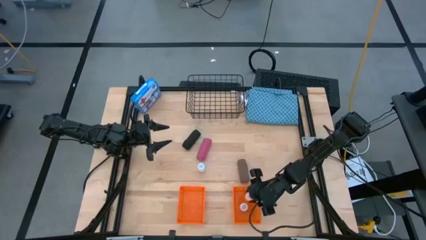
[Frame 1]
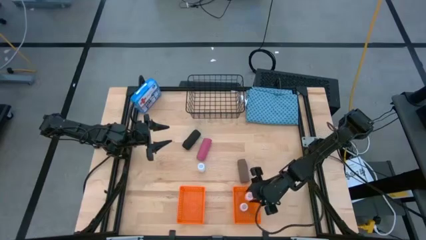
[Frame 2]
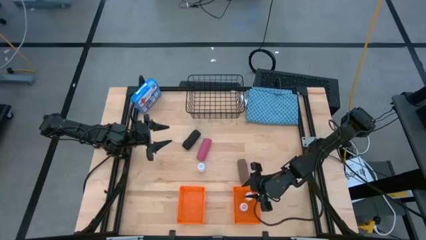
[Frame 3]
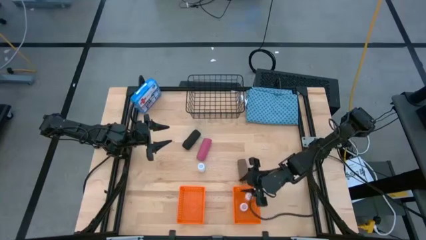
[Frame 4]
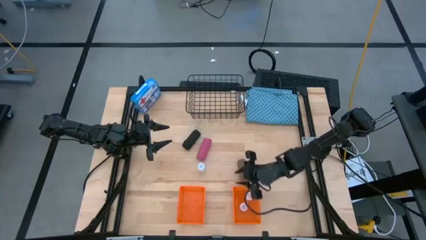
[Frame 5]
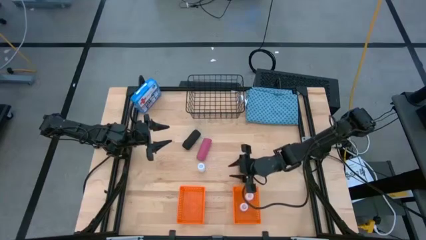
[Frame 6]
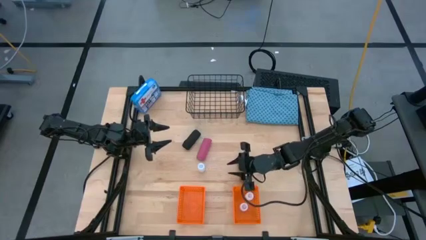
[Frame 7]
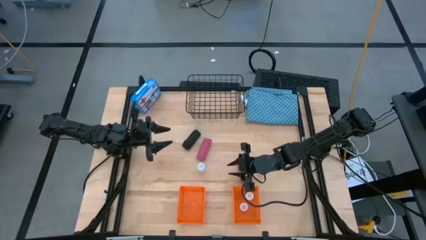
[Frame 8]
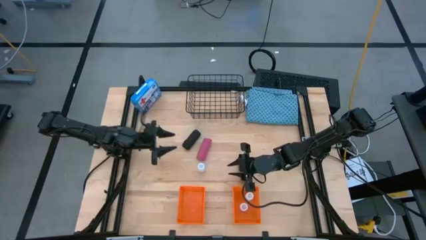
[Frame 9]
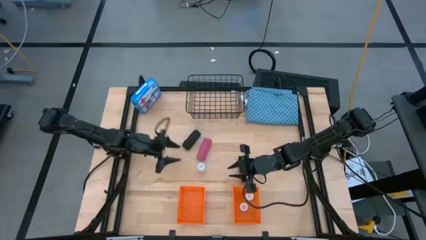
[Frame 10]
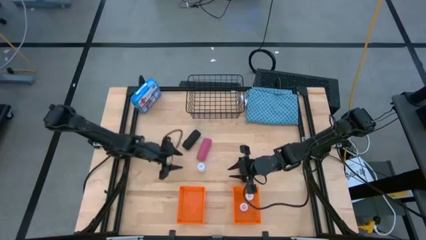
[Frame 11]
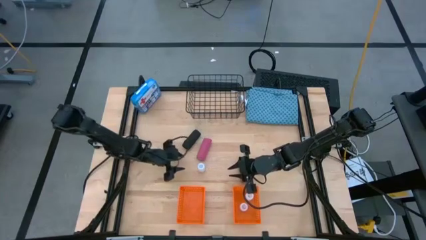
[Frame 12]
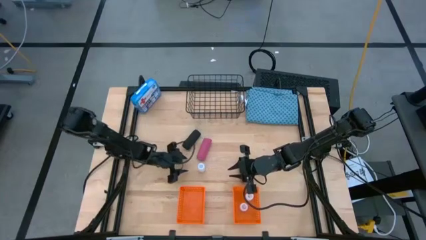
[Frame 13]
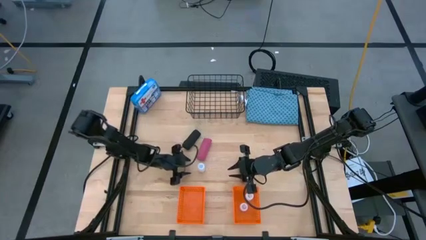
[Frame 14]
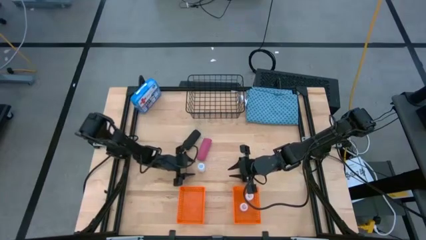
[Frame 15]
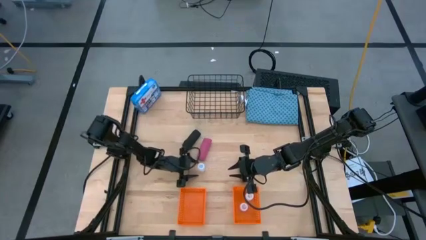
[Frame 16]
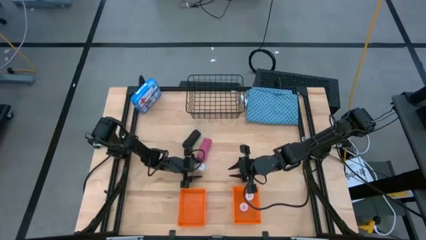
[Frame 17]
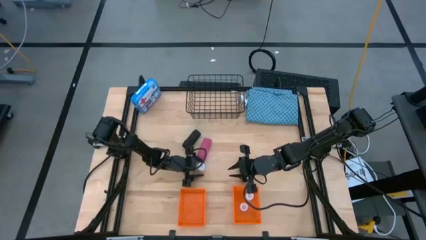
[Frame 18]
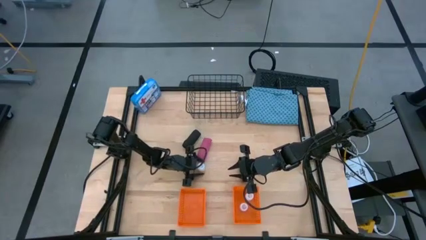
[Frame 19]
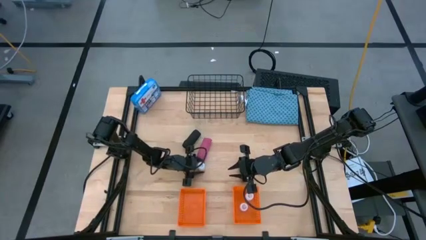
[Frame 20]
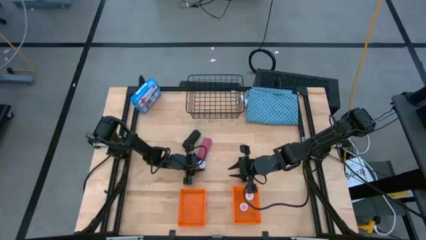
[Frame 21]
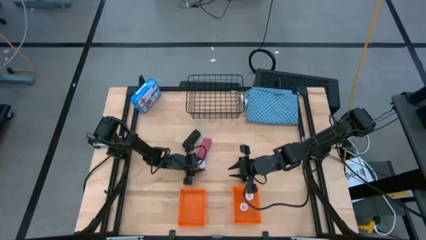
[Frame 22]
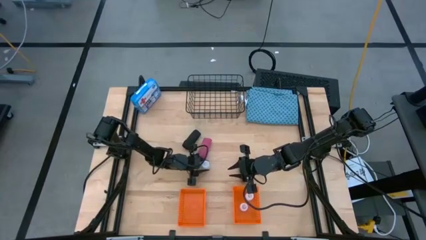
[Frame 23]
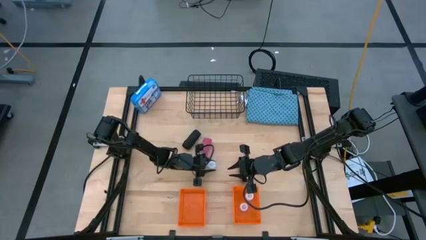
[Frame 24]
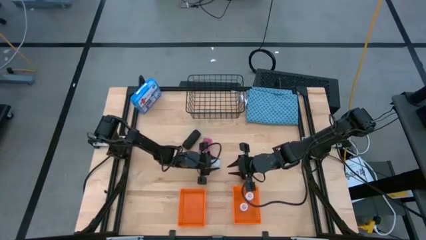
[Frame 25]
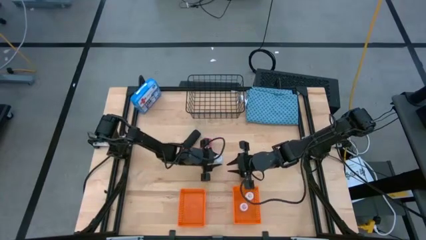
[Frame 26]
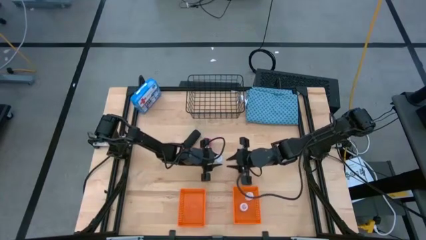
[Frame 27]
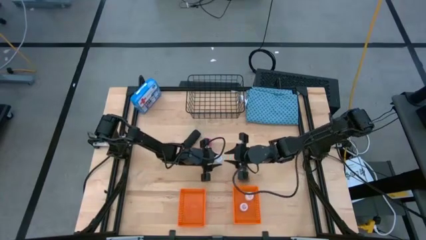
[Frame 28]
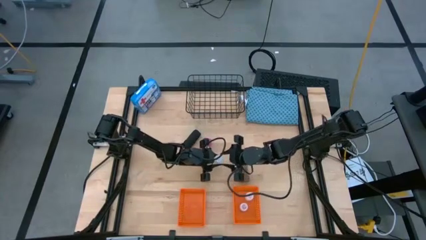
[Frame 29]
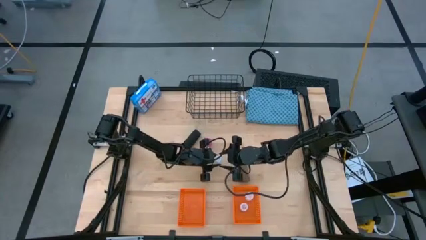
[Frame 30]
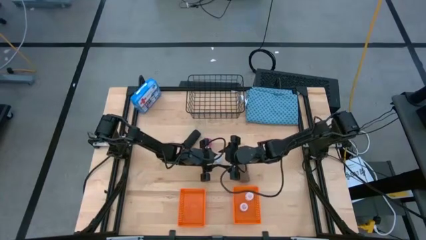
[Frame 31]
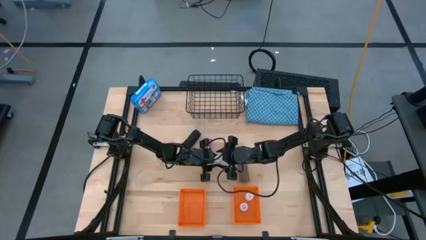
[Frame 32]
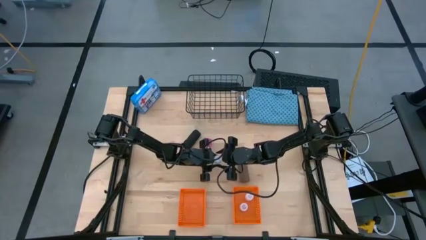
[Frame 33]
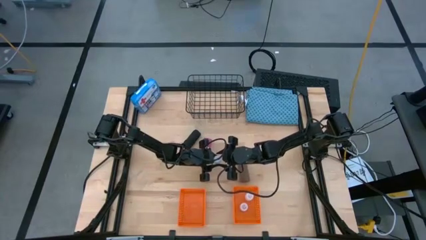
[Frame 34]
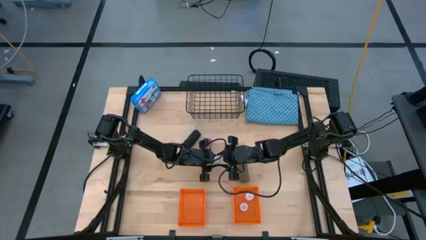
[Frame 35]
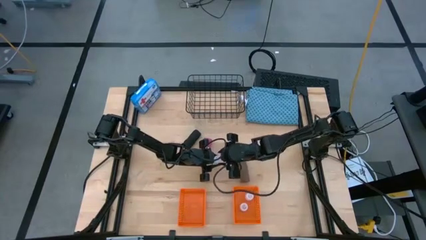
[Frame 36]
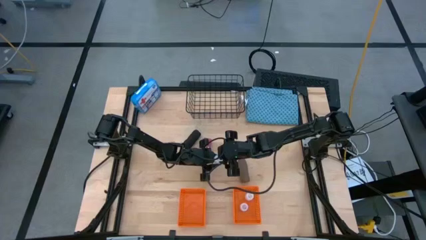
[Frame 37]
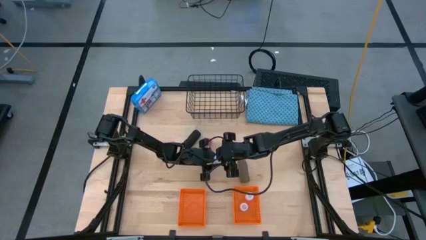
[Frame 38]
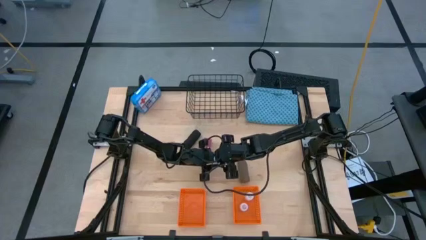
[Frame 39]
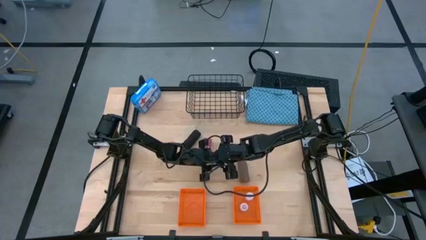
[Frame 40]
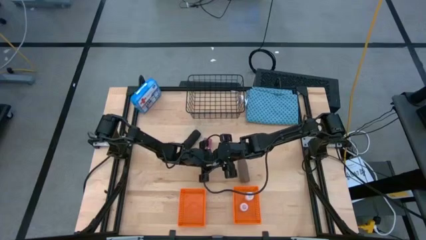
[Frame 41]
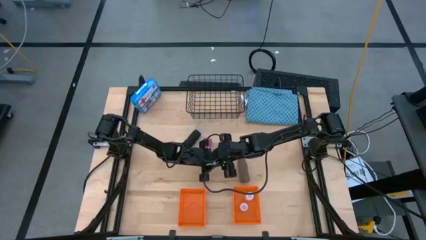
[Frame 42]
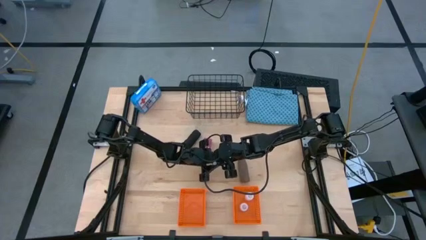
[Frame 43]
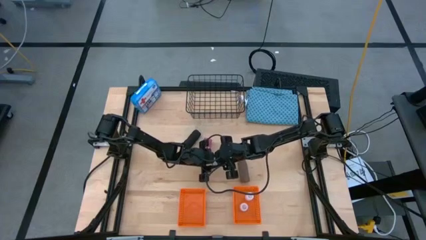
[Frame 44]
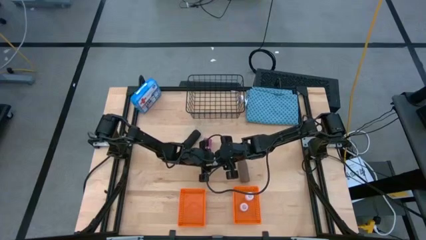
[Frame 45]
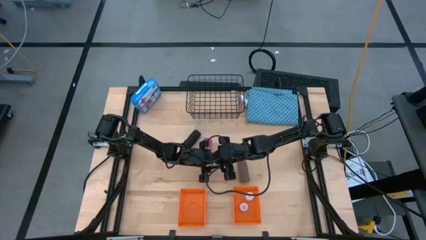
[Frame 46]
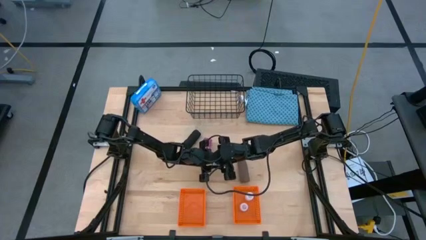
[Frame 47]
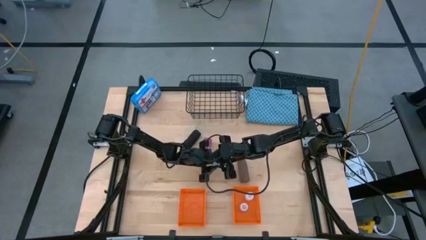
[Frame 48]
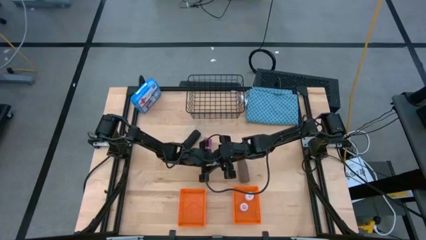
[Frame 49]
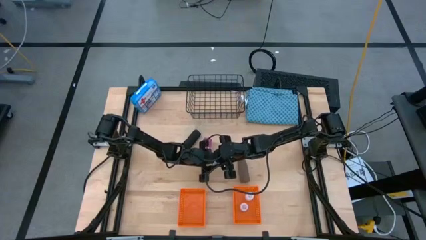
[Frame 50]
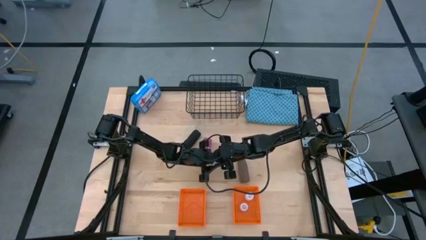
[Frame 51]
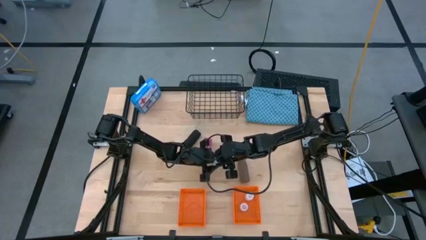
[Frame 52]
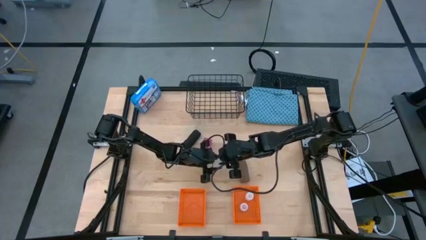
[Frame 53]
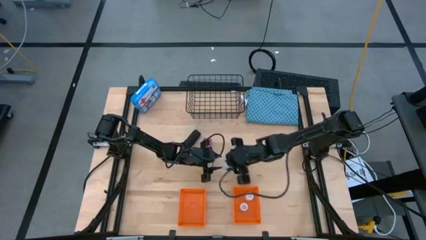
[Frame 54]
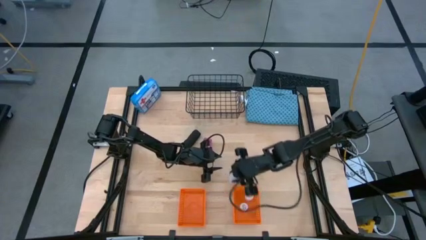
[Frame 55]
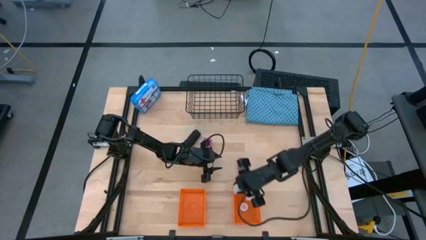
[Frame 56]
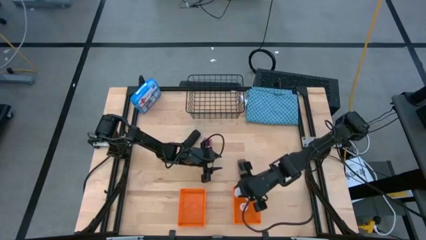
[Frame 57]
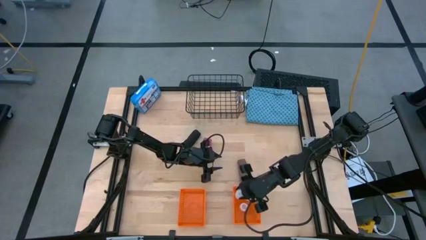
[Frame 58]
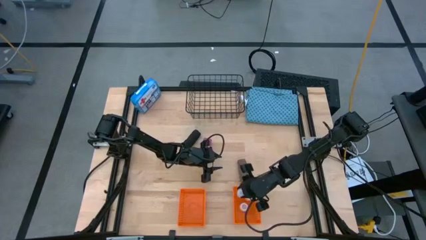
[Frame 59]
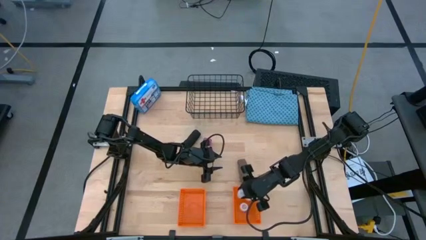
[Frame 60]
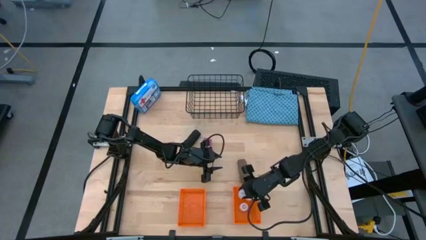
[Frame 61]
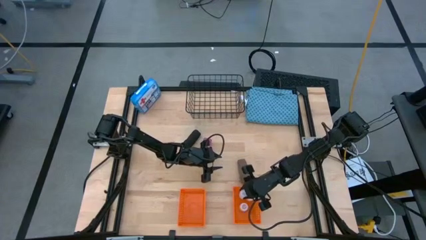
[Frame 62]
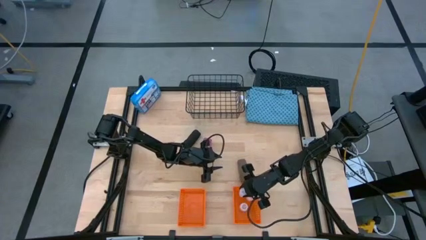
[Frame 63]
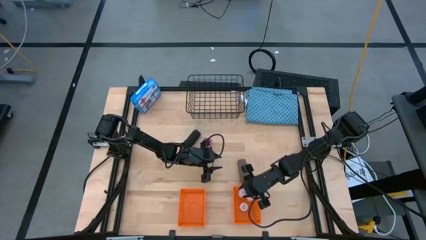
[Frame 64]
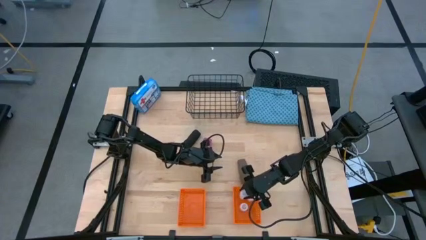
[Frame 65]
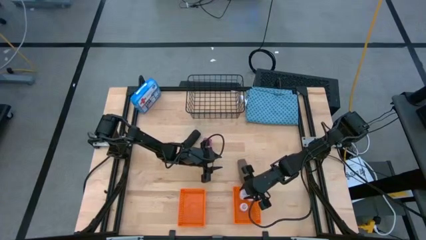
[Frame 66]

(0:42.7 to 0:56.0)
Task: Pick & Place Medicine items
Put the transparent pill bottle into the right orange basket
